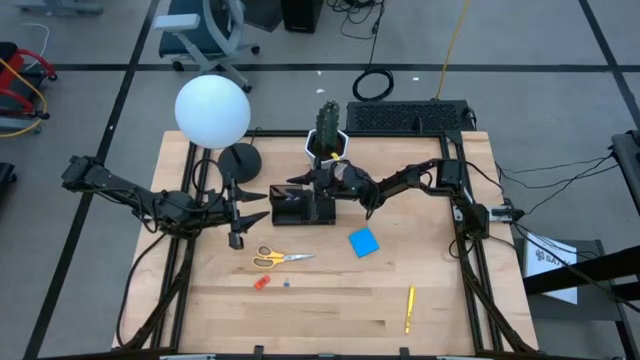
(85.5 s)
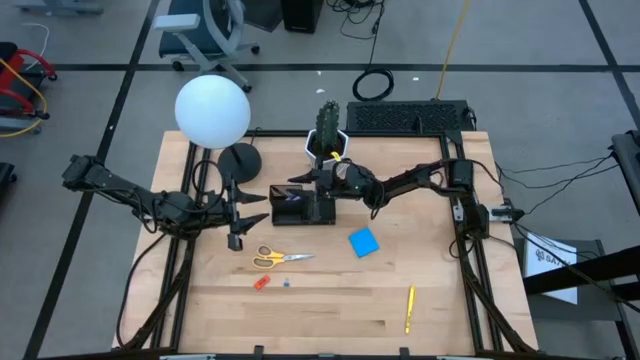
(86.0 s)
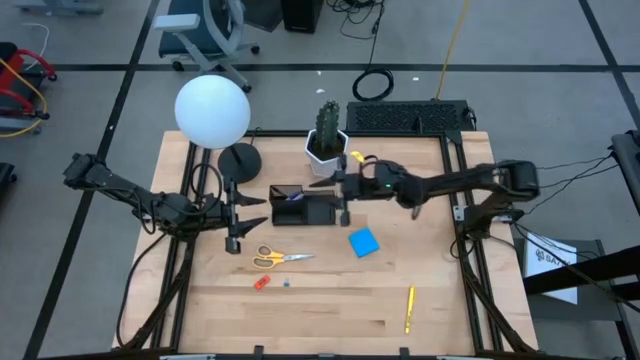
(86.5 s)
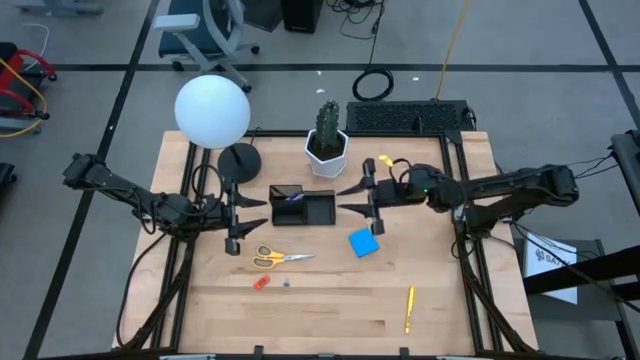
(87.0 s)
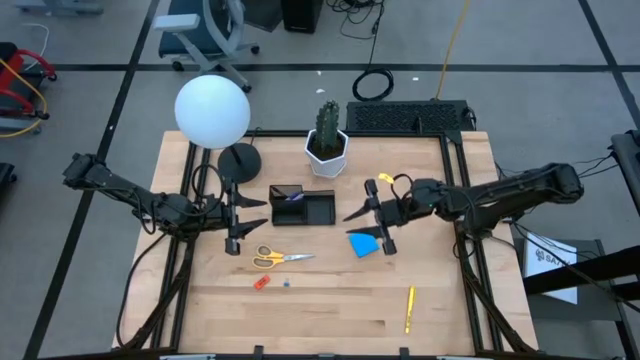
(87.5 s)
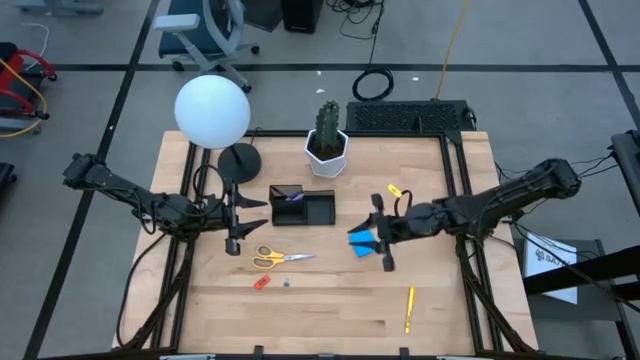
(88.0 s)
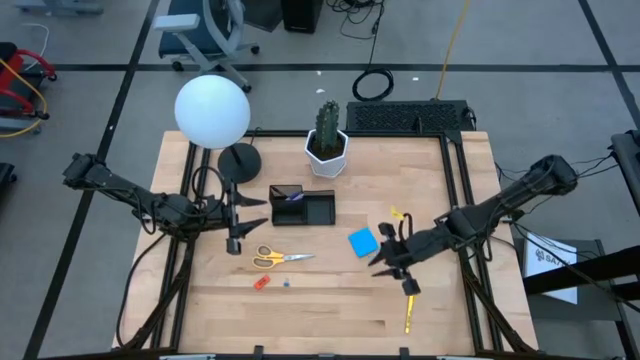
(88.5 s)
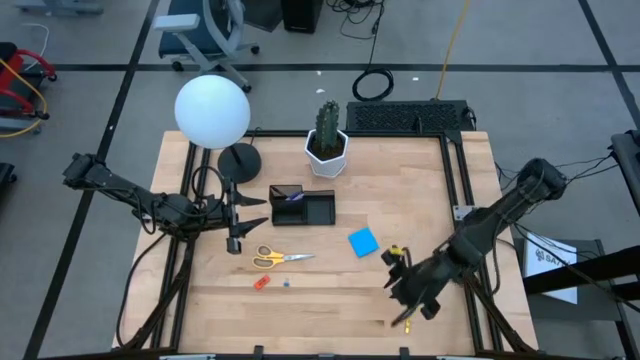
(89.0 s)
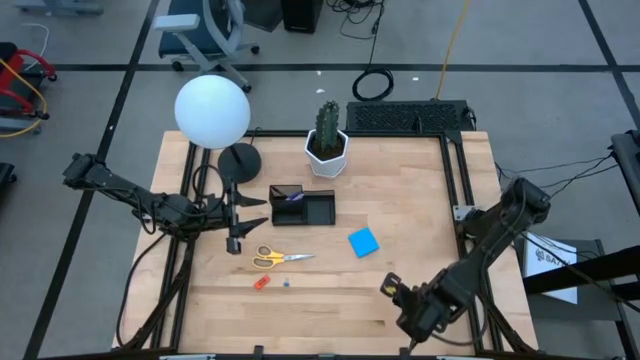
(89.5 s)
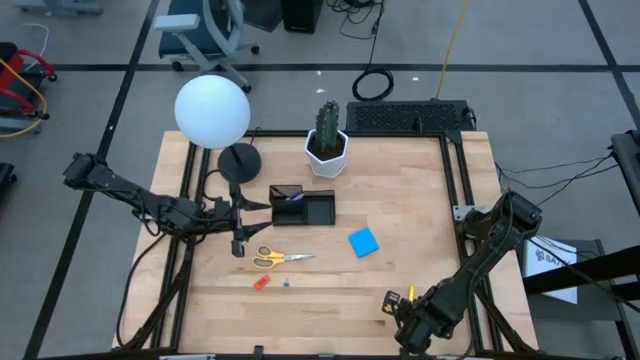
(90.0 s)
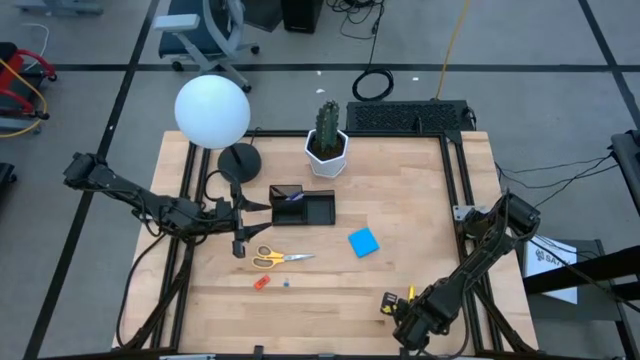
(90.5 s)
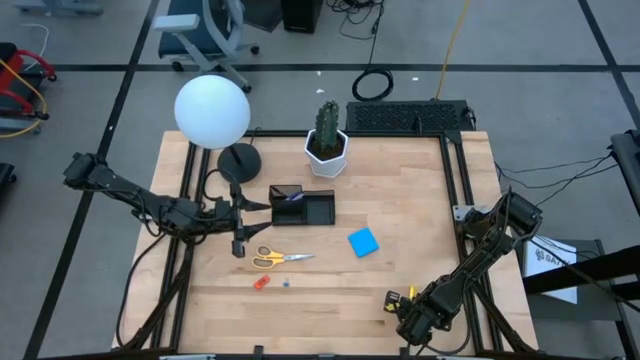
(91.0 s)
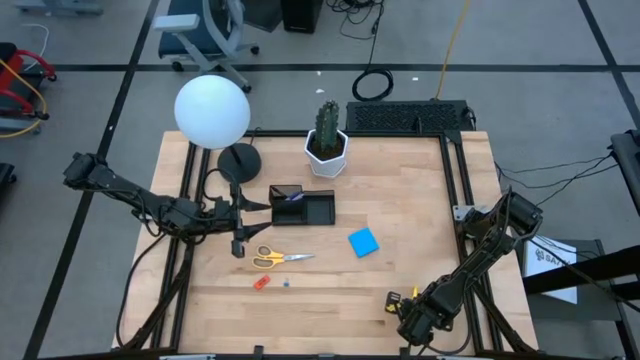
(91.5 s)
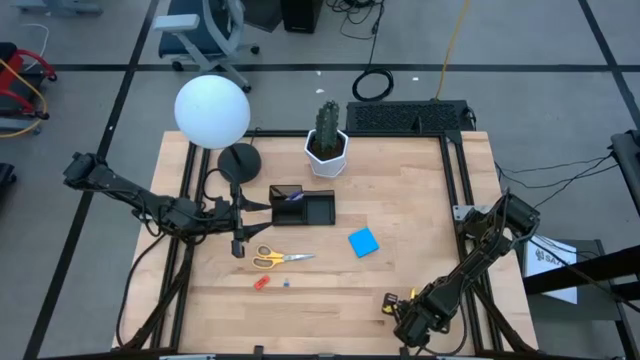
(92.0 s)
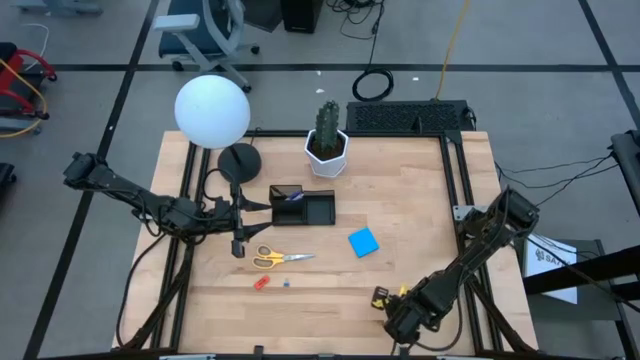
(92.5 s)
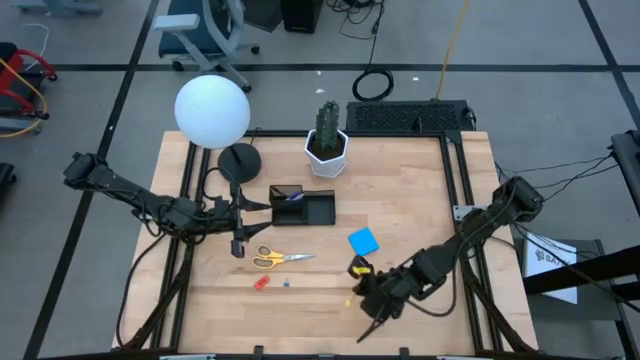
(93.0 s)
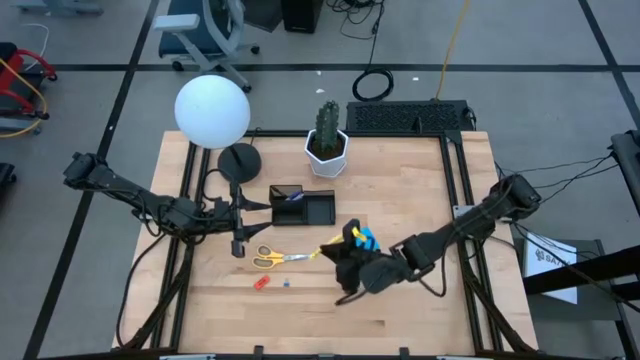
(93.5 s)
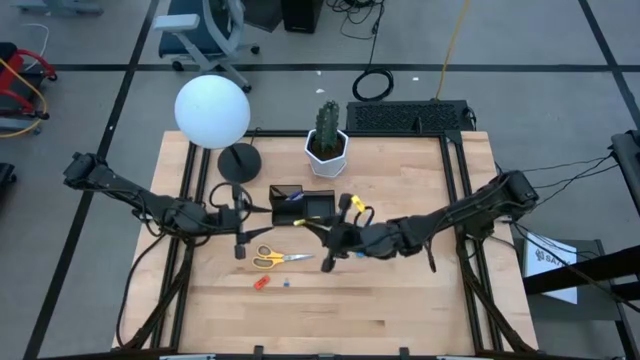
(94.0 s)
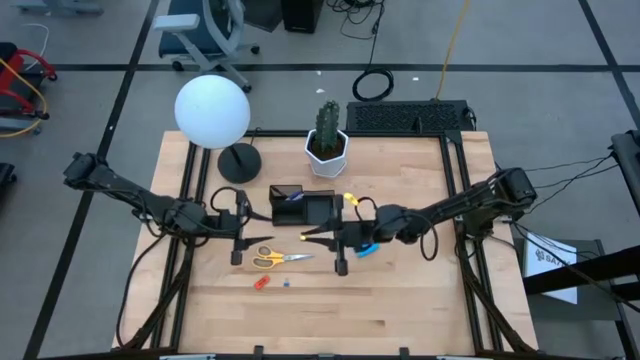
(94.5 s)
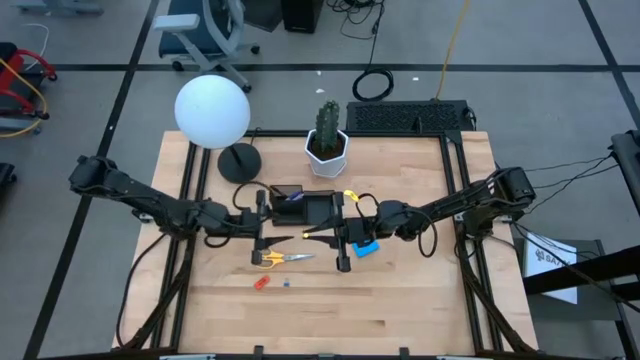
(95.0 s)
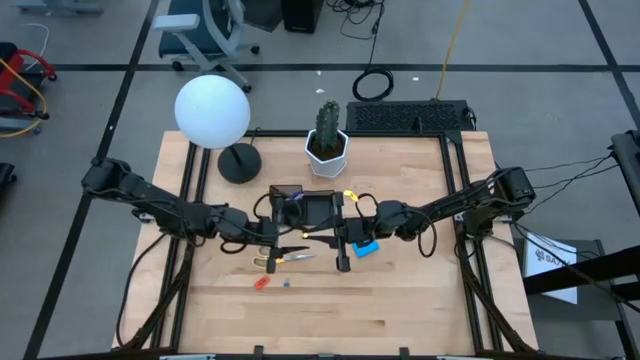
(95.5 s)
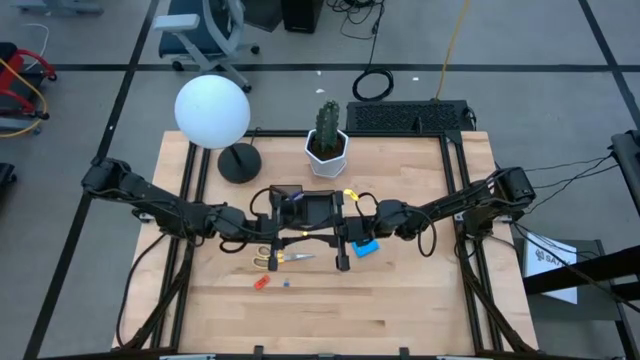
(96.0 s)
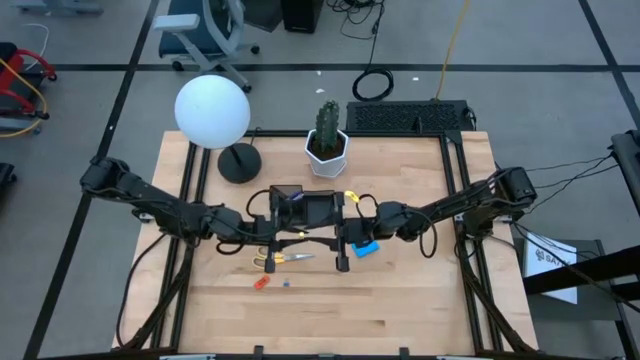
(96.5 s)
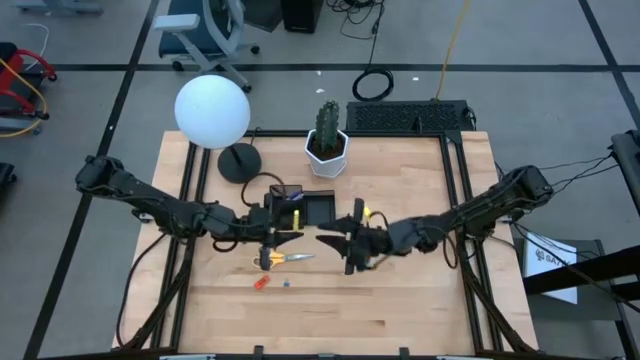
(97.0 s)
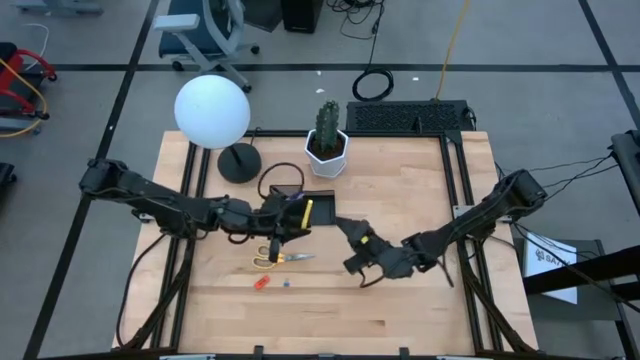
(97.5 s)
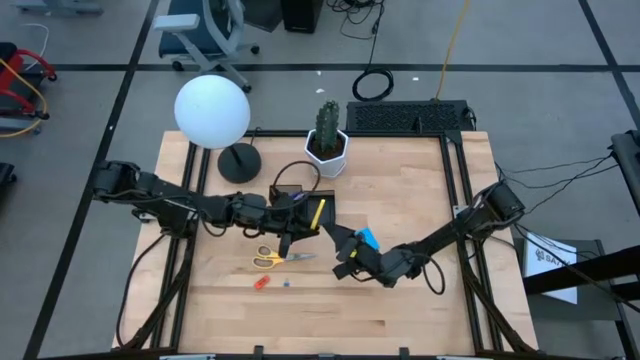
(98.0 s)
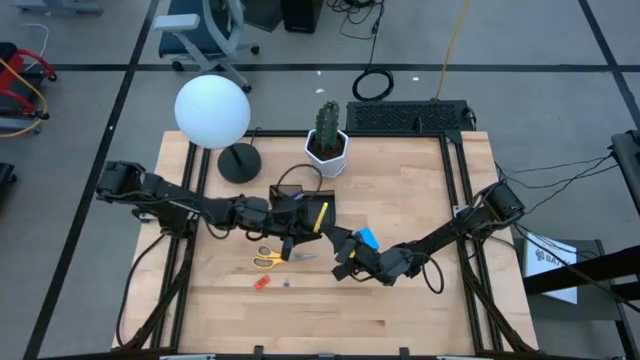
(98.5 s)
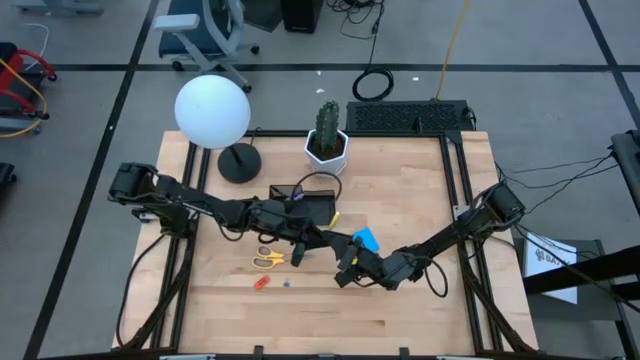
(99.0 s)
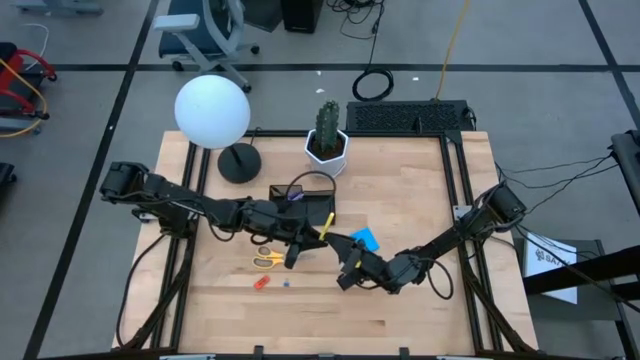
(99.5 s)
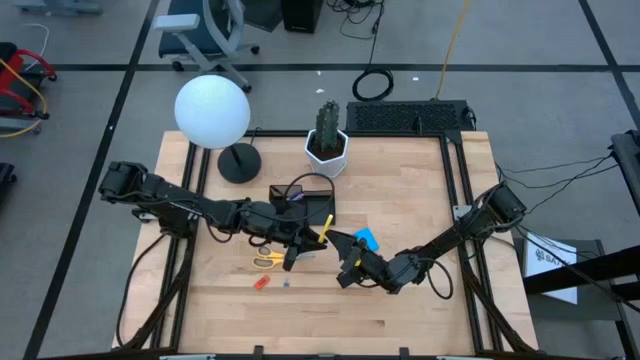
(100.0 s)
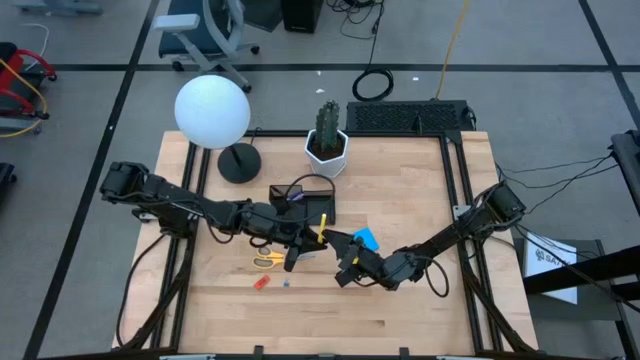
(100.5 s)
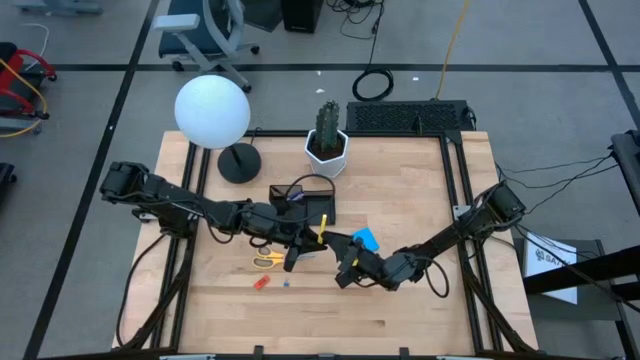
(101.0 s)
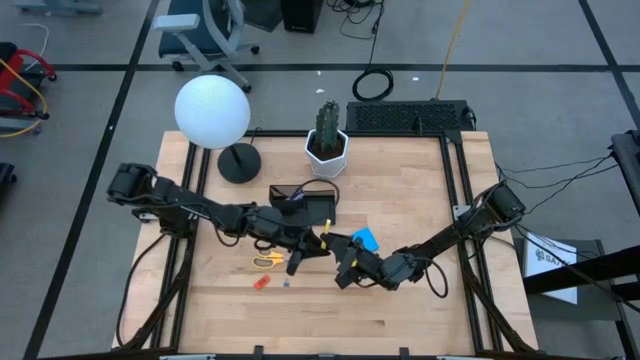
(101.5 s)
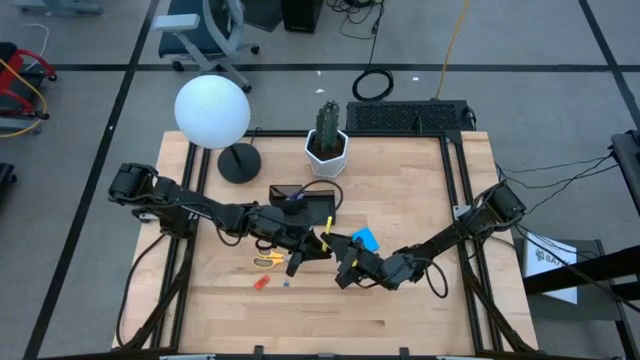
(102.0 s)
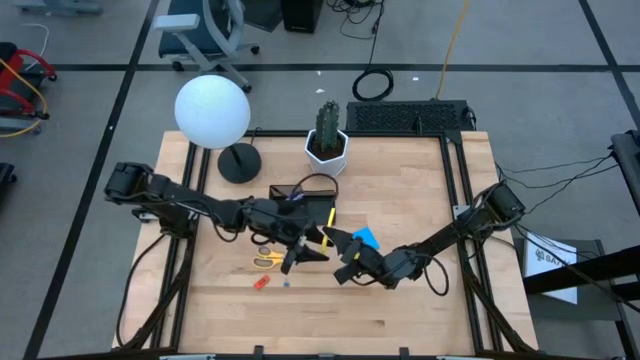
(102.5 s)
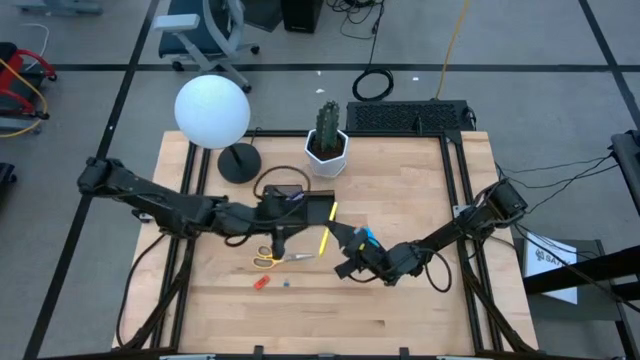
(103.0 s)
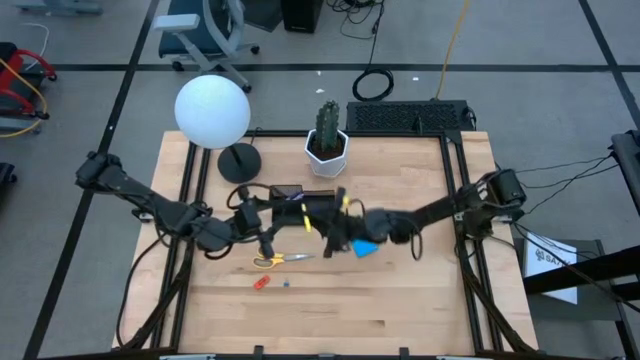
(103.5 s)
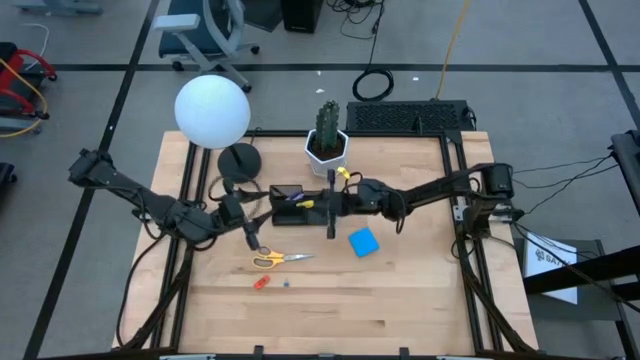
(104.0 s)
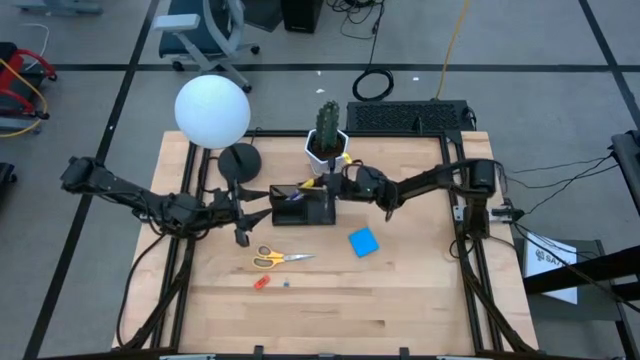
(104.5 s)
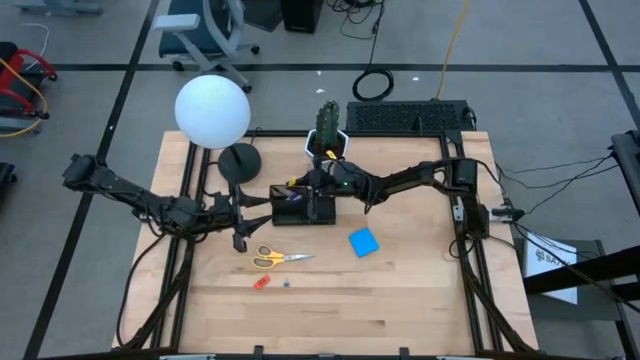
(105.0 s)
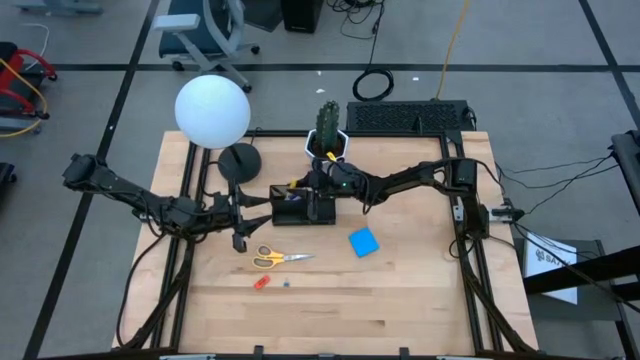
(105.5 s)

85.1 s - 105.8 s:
Task: Pick and place office supplies into organizer
Put the yellow pen into the desk organizer

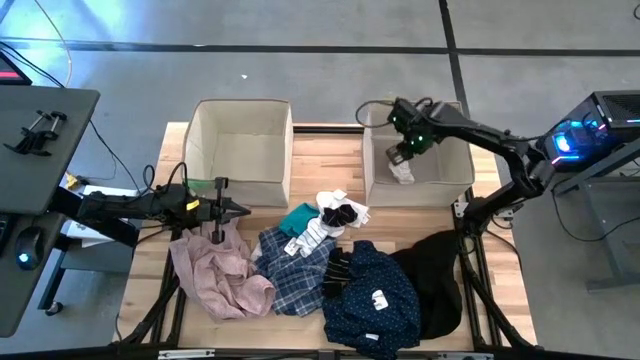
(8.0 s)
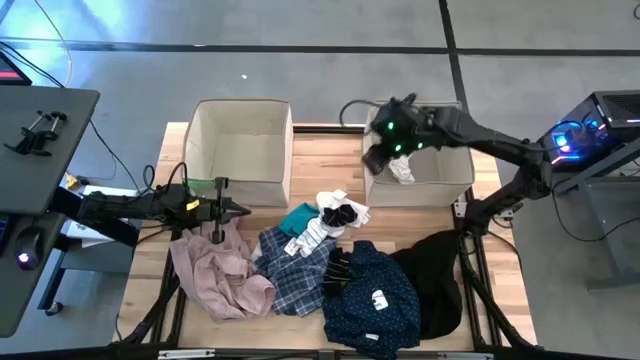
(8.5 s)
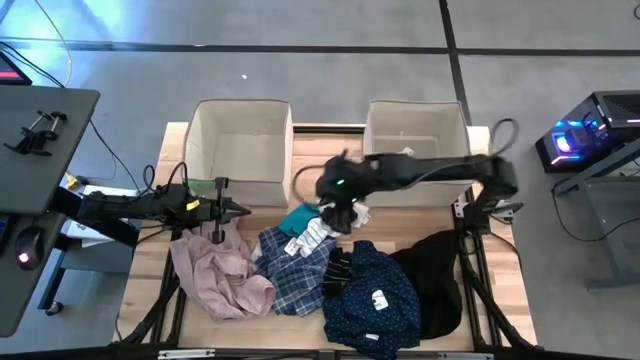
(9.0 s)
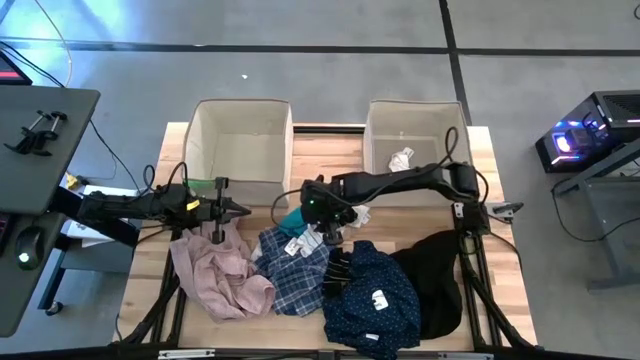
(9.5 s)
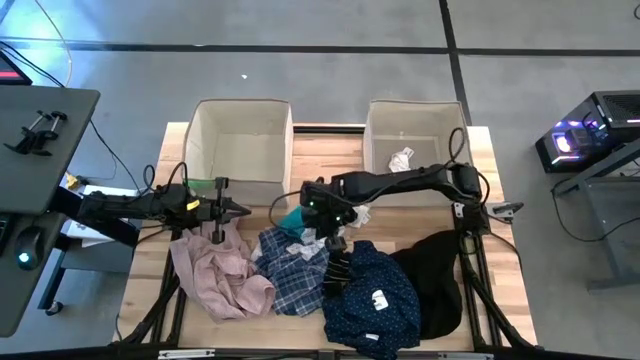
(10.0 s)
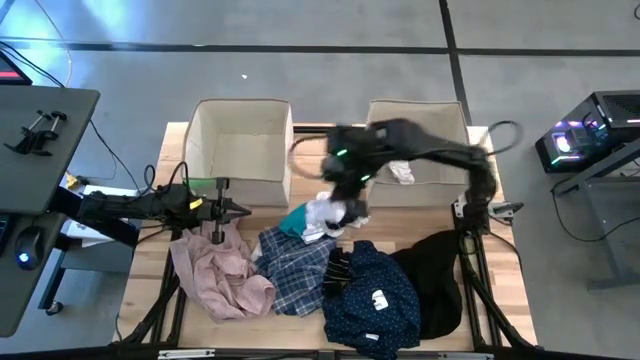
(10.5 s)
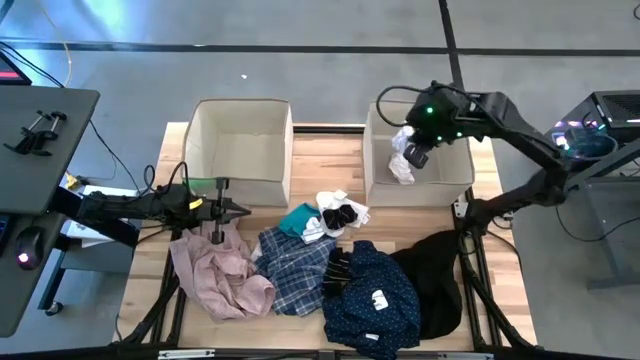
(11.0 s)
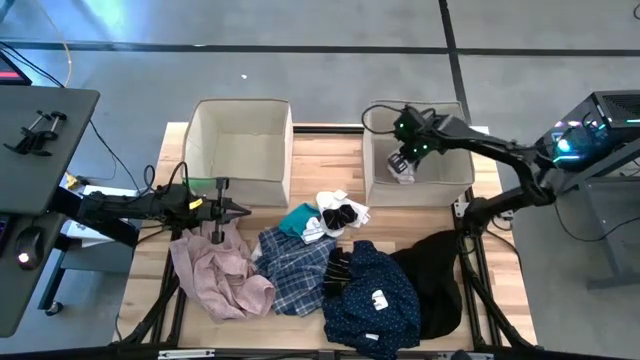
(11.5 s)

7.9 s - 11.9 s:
Task: Sort clothes
Put the white striped sock into the right laundry organizer
